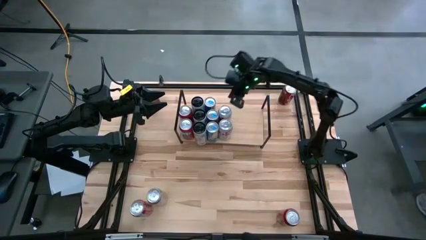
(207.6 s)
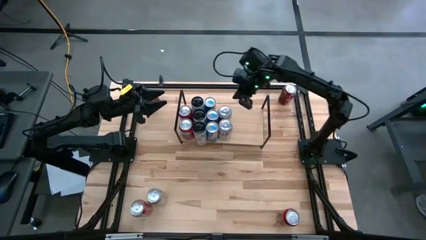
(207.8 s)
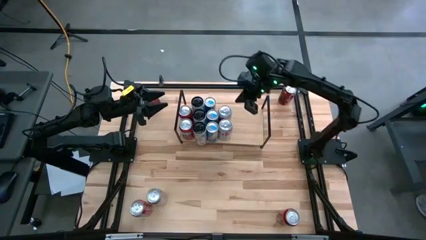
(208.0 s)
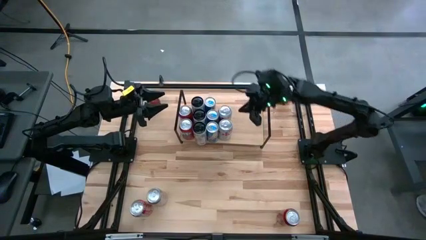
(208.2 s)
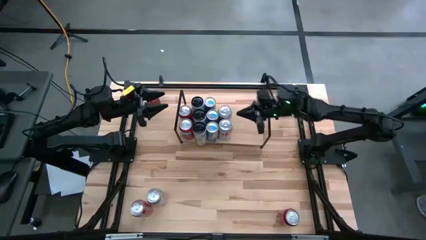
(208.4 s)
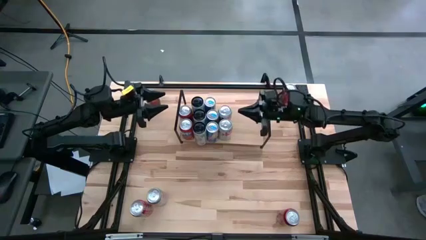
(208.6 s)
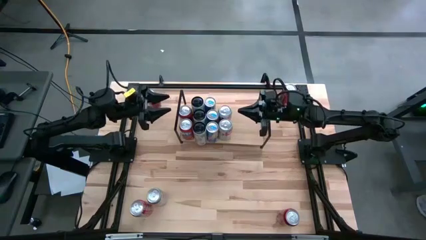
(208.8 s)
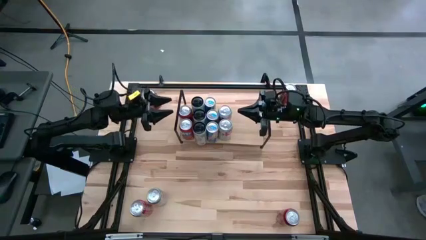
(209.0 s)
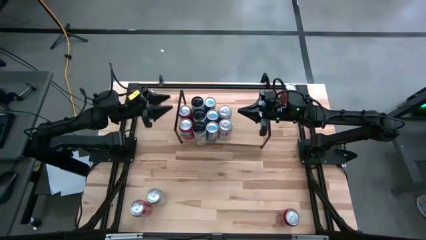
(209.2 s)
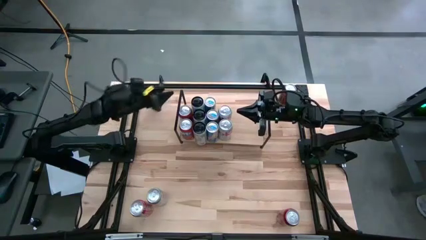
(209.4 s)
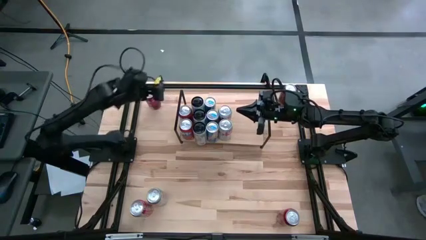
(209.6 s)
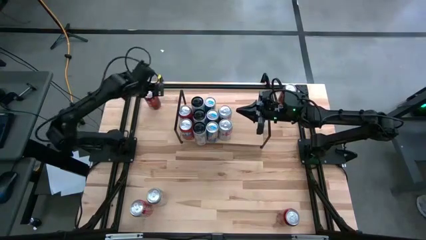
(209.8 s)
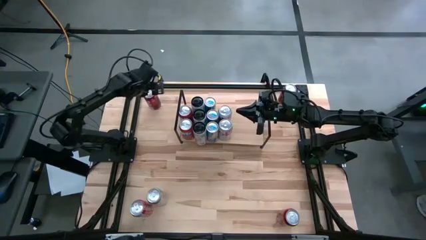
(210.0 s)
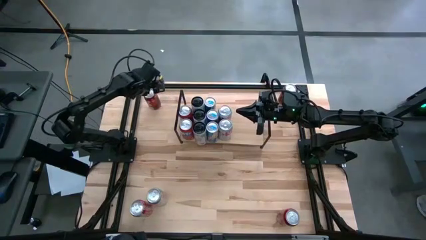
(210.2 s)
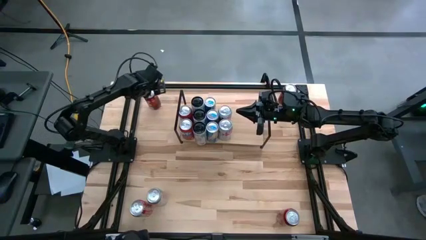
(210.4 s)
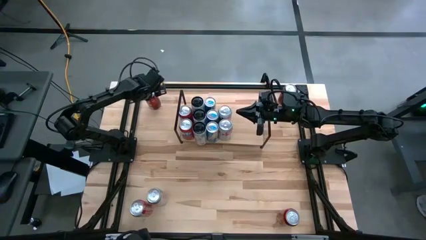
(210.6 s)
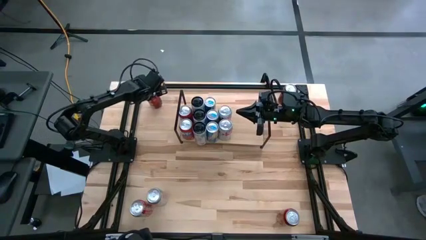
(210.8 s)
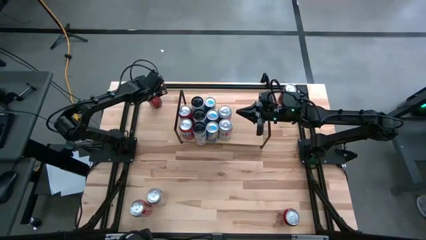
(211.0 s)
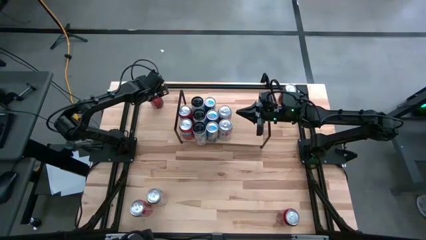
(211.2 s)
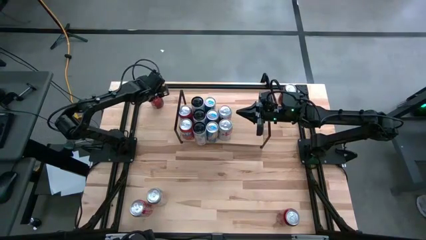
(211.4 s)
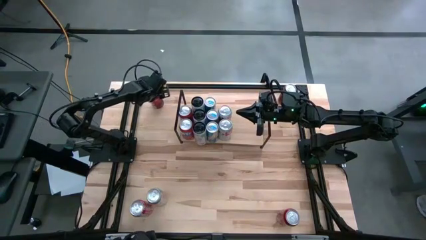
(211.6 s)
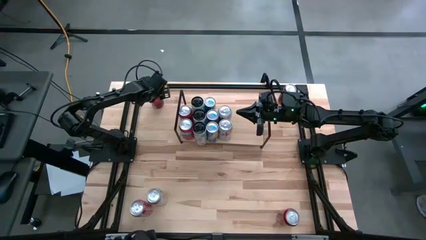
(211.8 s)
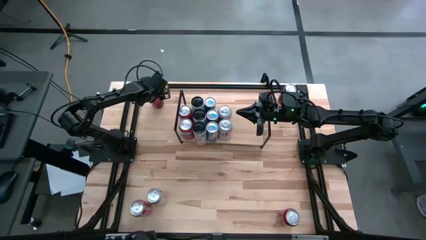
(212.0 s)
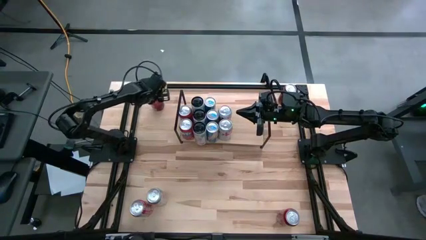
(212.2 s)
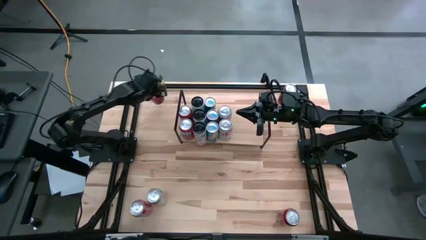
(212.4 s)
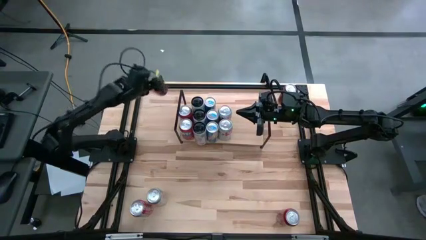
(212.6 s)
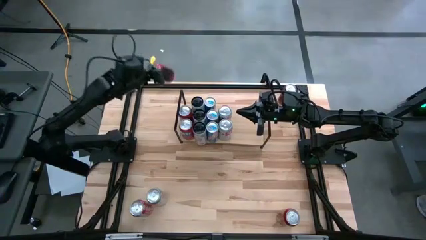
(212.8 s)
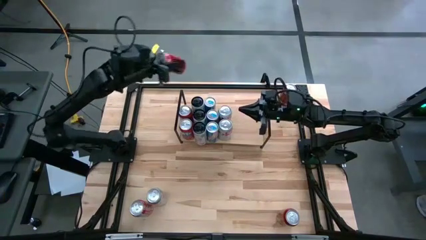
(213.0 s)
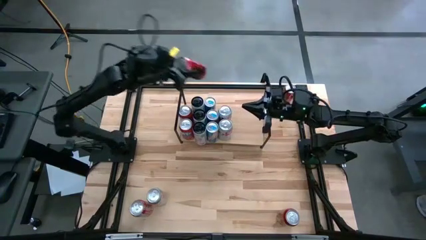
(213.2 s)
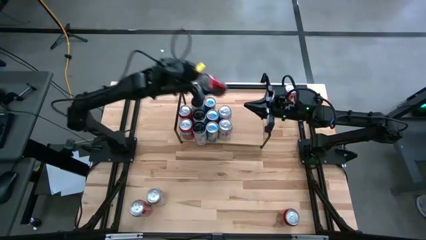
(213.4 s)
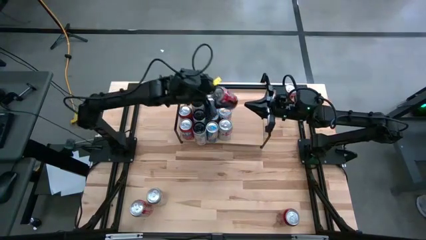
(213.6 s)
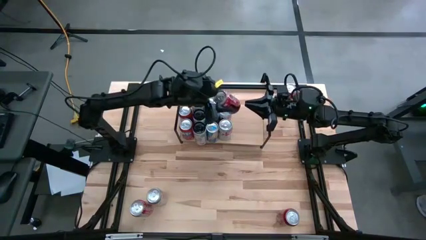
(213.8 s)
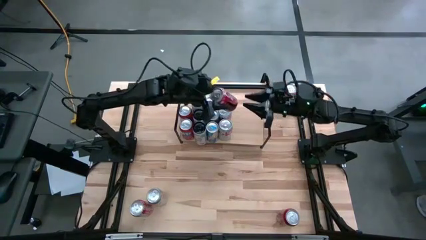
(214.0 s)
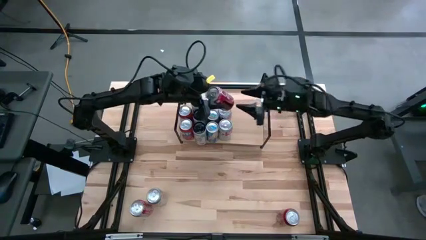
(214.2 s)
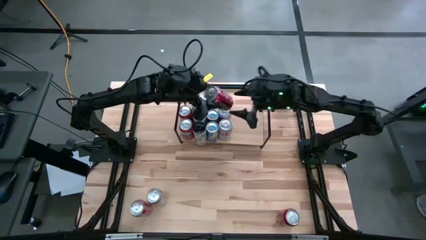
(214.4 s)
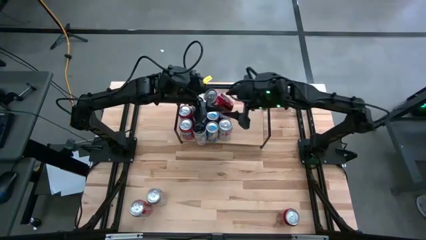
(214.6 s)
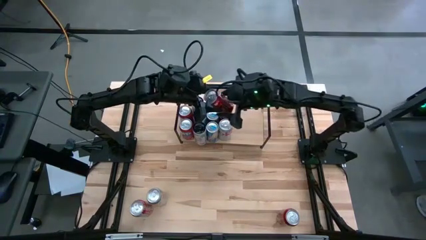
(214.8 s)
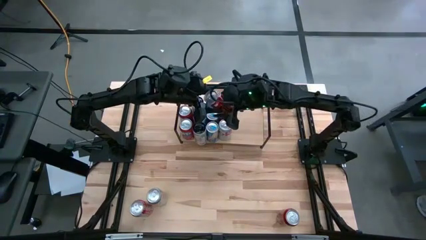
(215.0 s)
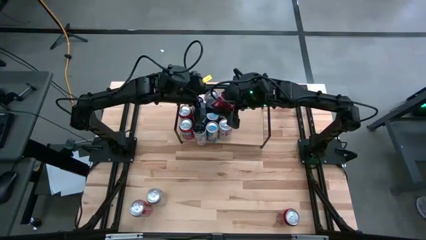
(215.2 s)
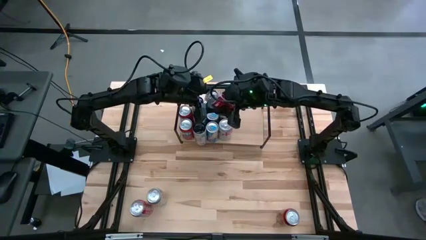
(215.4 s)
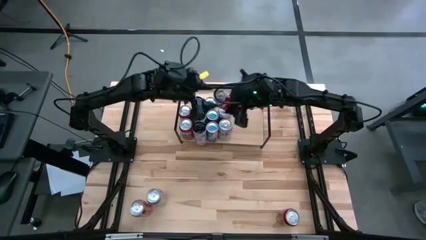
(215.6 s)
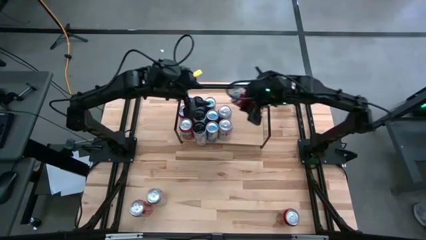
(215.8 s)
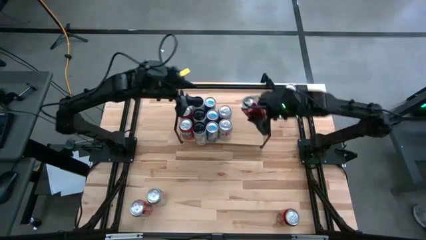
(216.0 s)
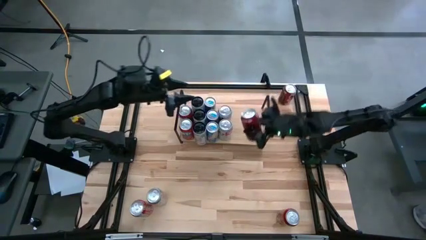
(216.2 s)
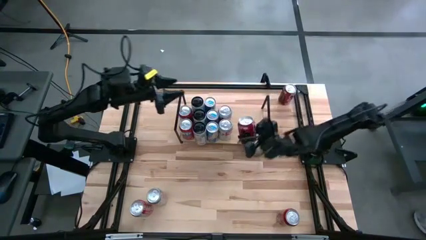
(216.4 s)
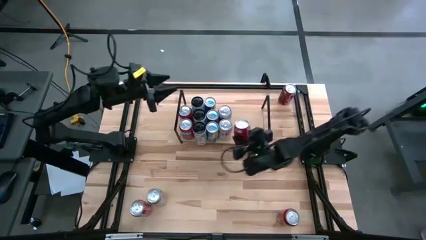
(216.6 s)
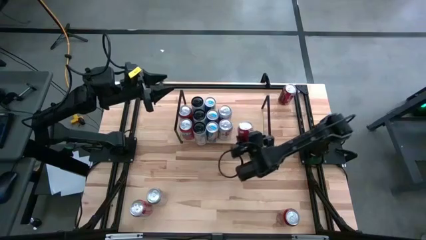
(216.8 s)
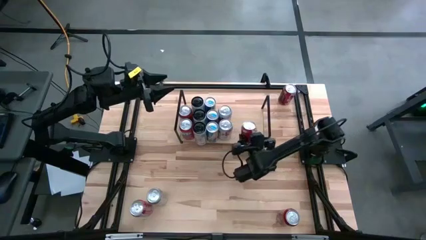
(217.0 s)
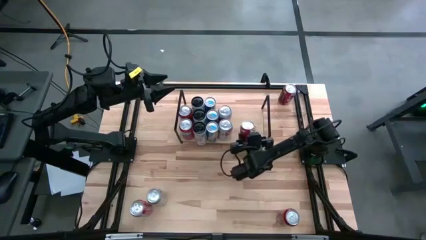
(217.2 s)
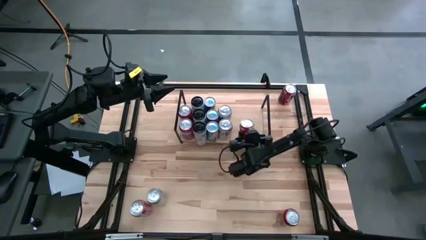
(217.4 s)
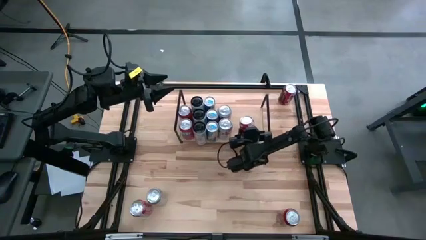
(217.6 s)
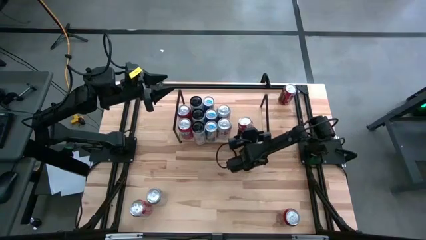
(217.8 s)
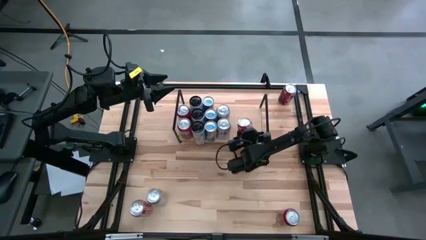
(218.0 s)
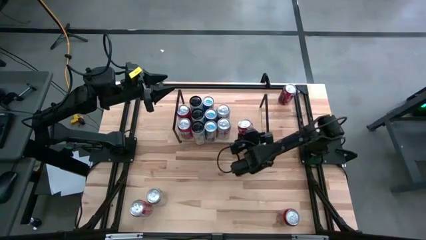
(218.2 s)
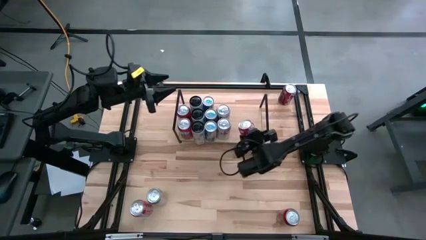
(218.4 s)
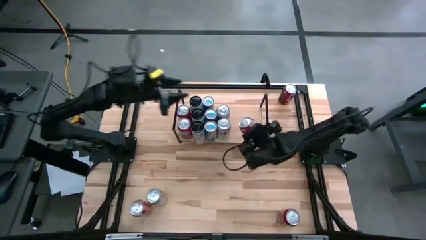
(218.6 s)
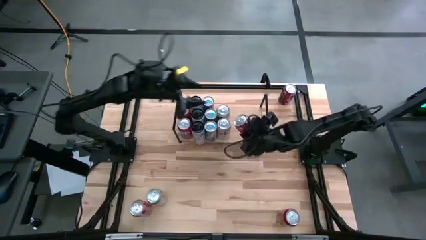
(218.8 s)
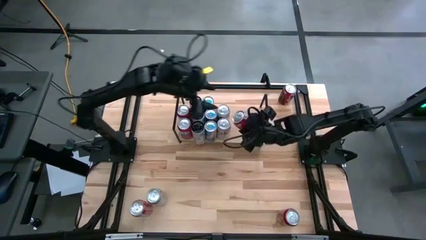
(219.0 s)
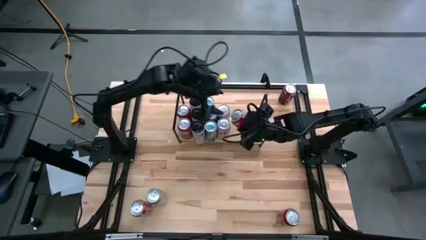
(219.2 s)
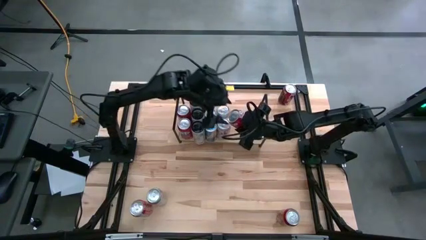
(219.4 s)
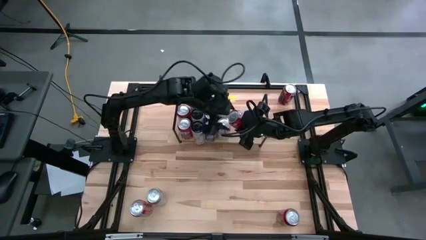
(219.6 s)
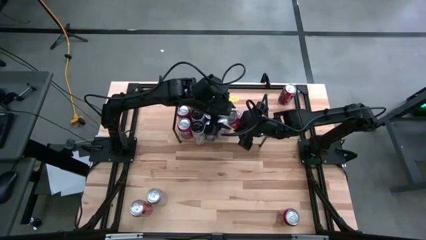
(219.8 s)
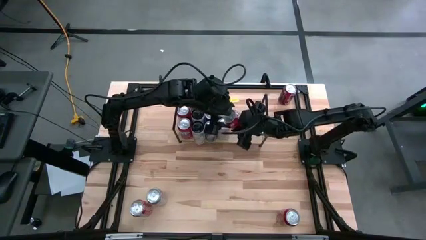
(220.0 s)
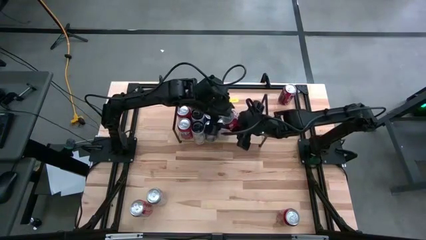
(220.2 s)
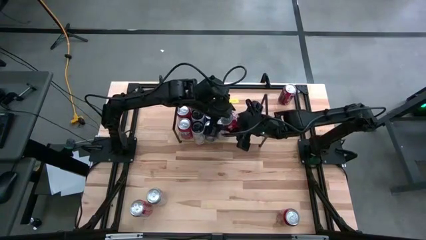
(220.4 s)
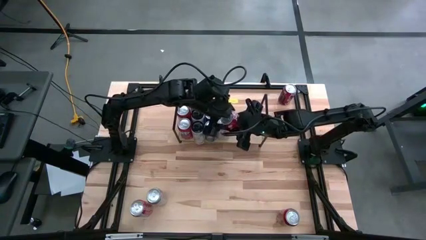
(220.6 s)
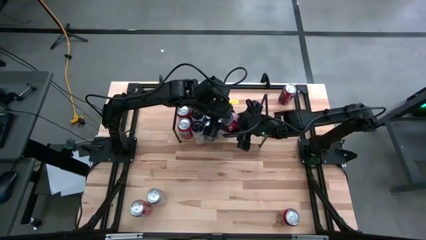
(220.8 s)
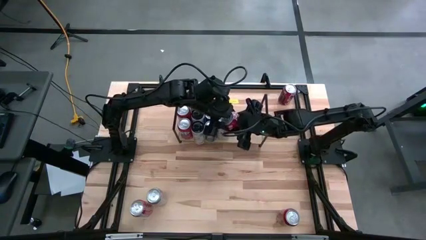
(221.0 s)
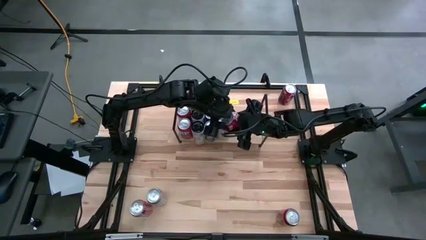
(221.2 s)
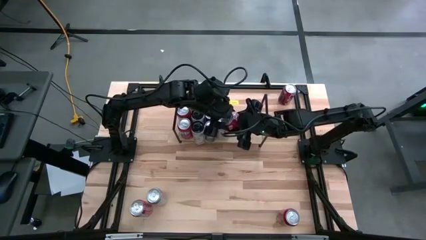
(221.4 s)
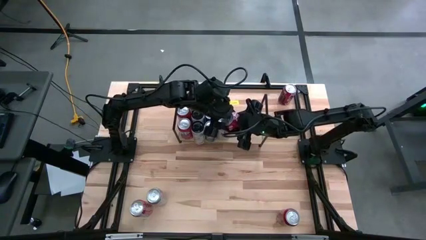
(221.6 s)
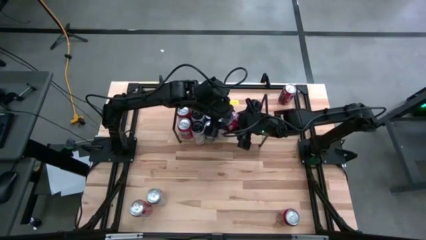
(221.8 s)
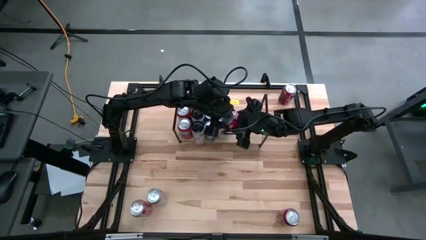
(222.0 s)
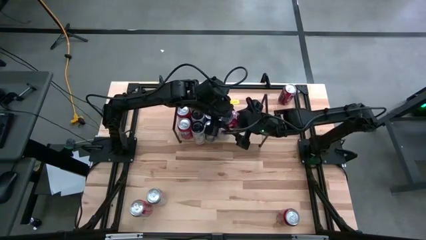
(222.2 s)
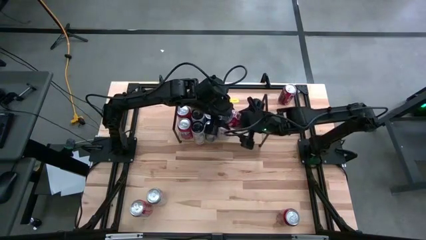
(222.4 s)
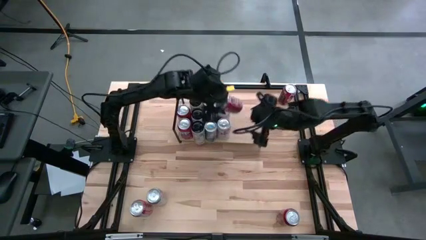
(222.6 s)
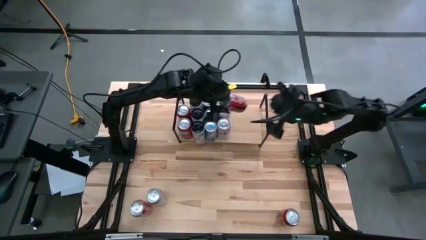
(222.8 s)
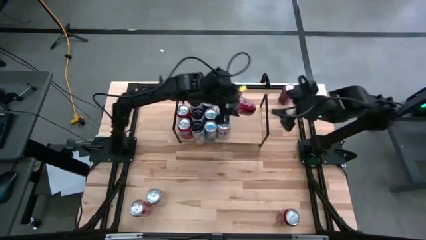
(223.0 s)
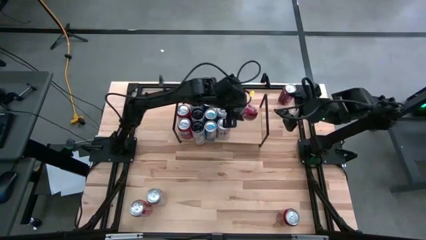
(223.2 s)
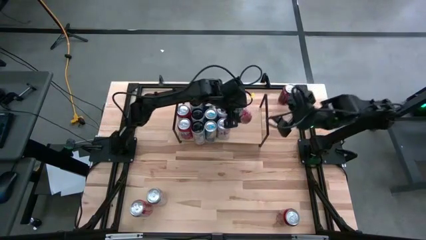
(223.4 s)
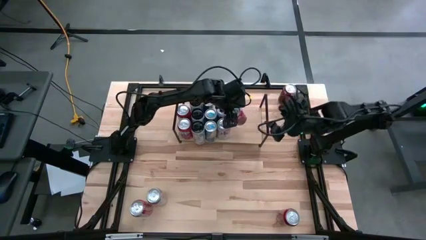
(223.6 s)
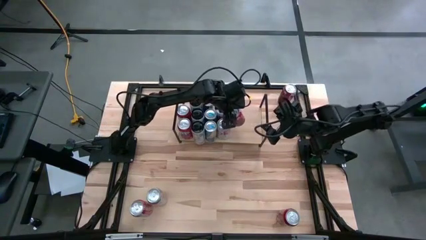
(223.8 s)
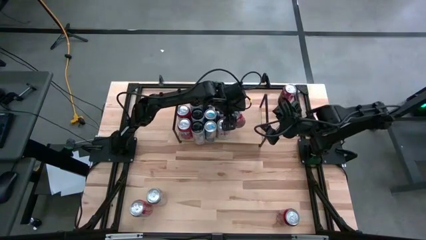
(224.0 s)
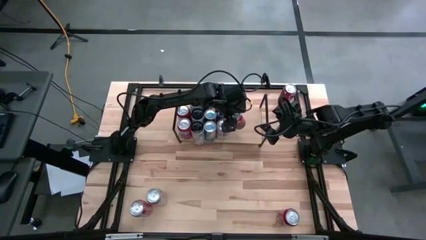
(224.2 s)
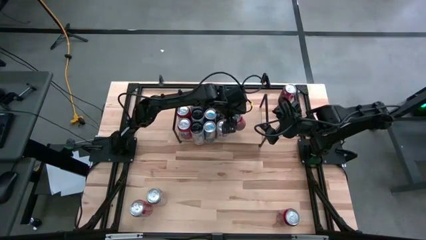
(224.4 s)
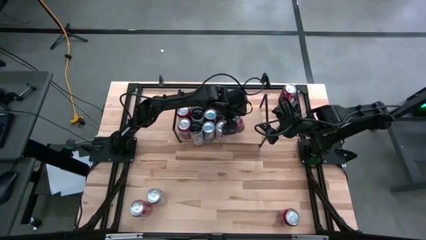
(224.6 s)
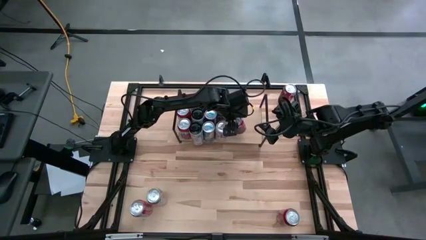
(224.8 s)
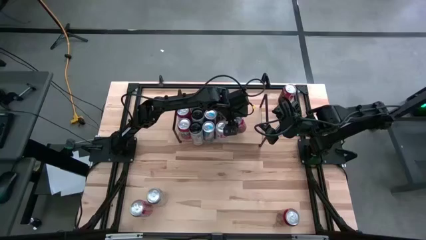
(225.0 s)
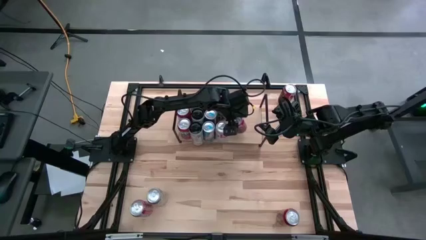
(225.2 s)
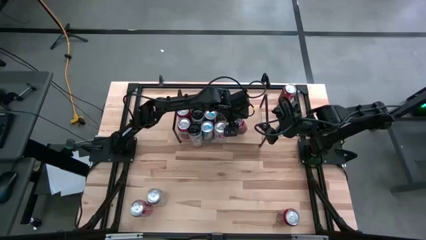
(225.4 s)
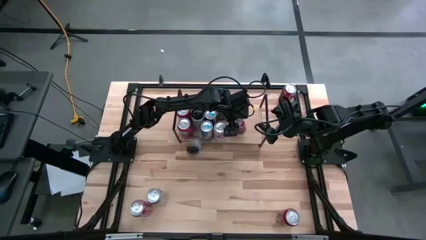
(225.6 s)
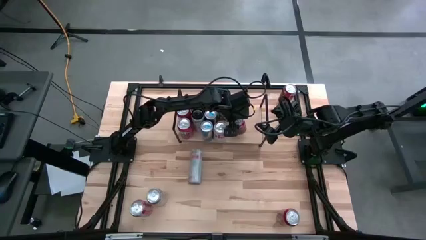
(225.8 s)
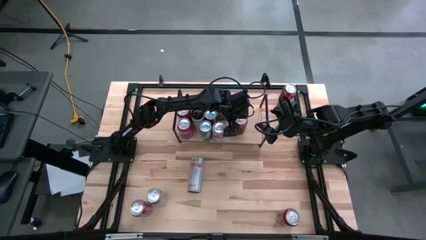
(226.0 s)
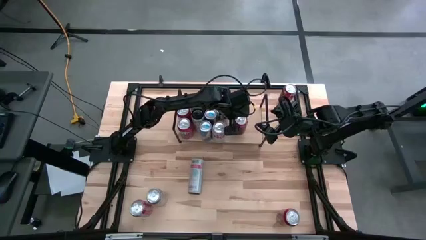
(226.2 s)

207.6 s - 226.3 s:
Task: Place canned beverage on shelf
Put the top right red-white soda can on the shelf
